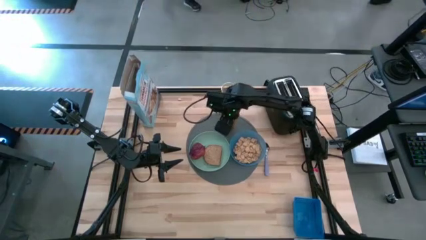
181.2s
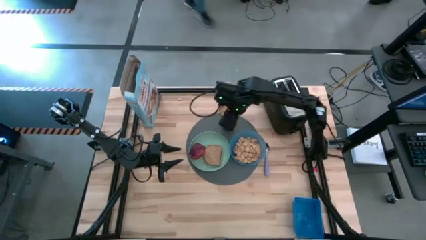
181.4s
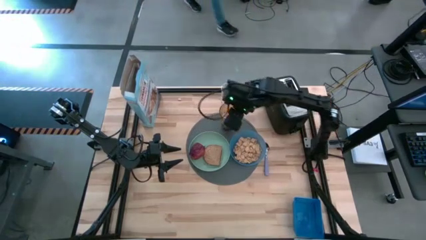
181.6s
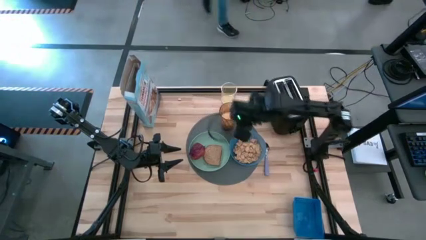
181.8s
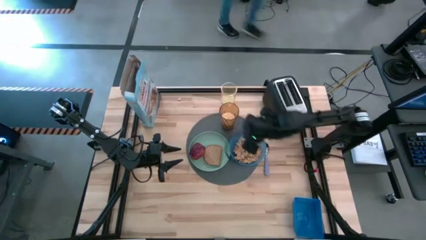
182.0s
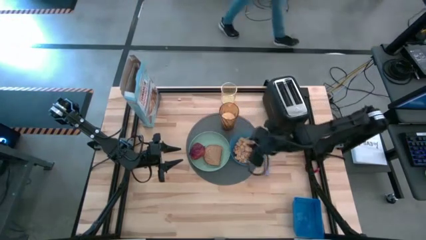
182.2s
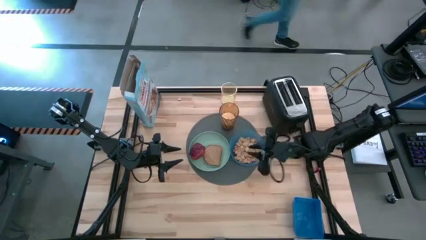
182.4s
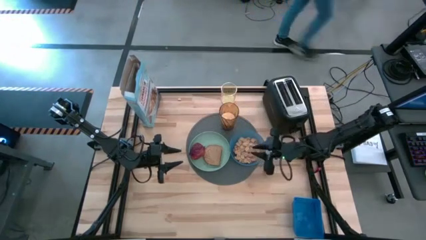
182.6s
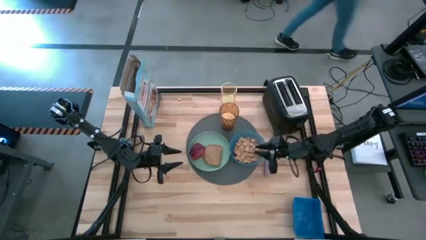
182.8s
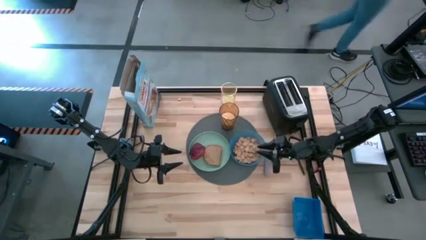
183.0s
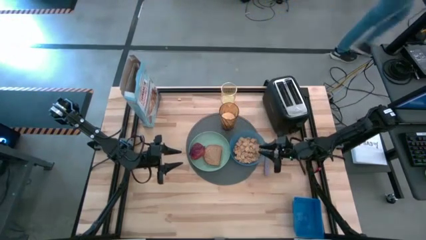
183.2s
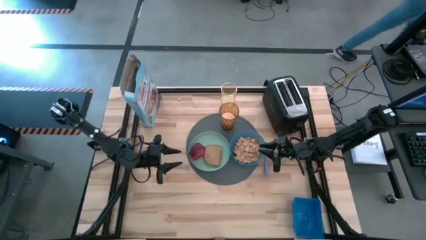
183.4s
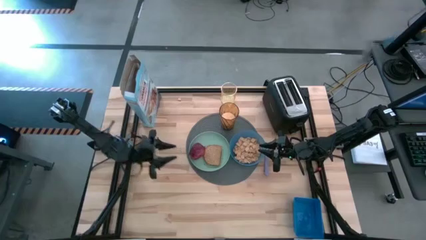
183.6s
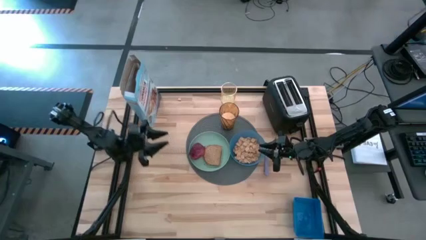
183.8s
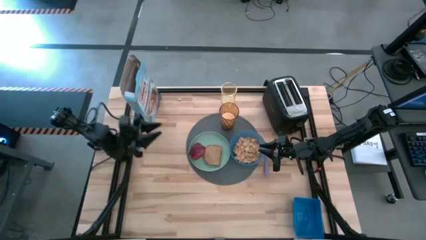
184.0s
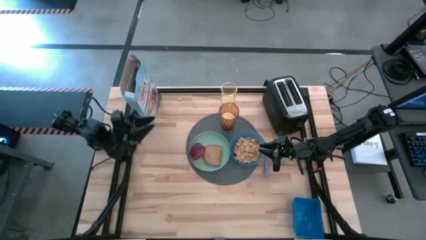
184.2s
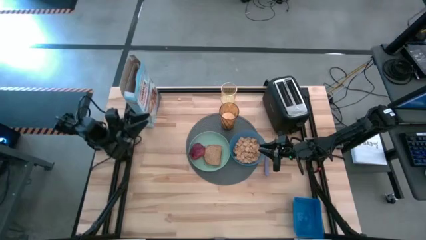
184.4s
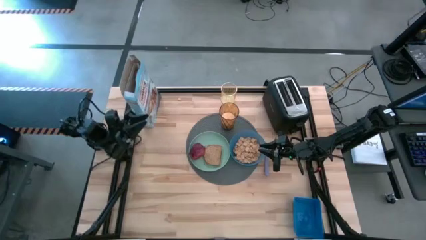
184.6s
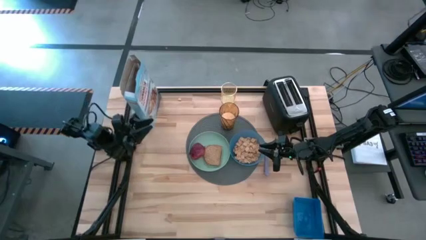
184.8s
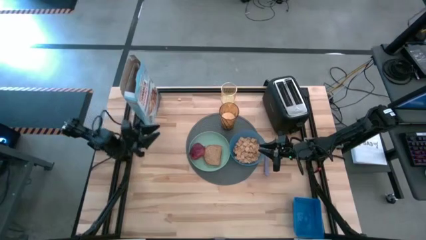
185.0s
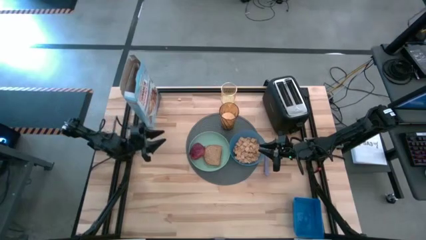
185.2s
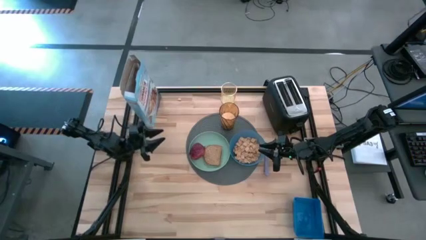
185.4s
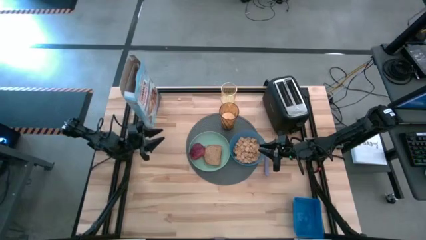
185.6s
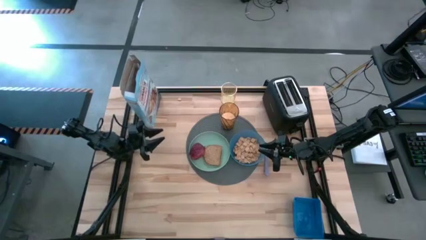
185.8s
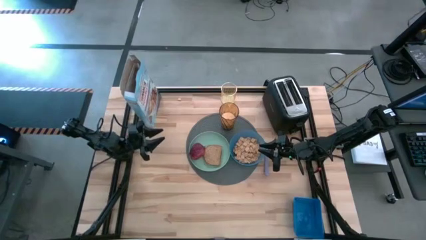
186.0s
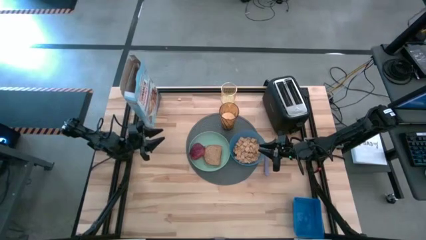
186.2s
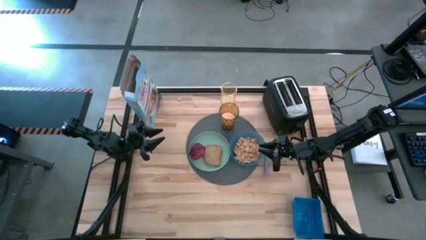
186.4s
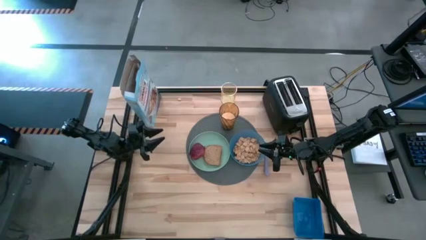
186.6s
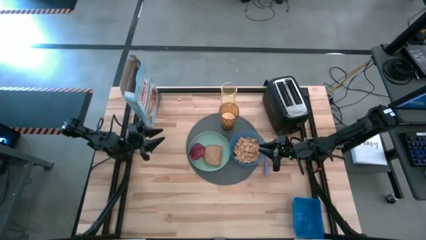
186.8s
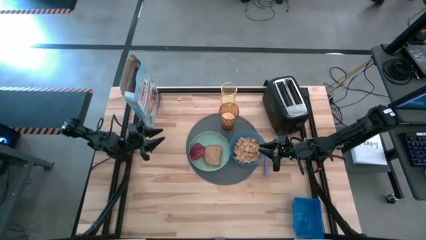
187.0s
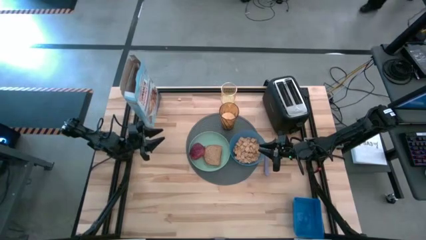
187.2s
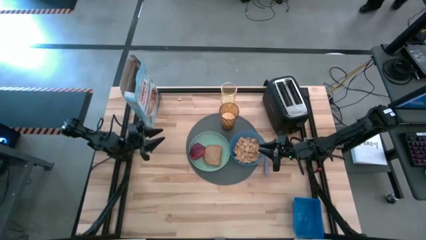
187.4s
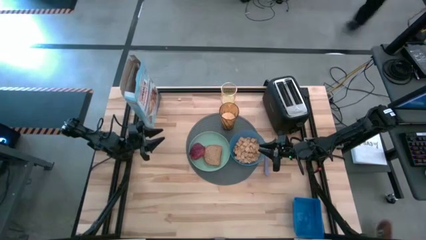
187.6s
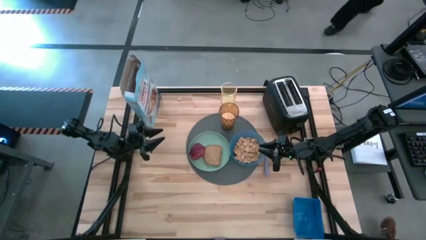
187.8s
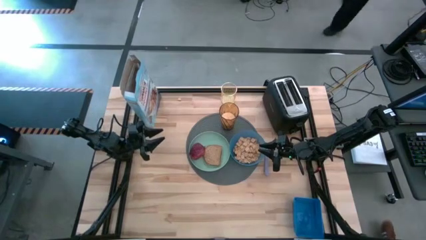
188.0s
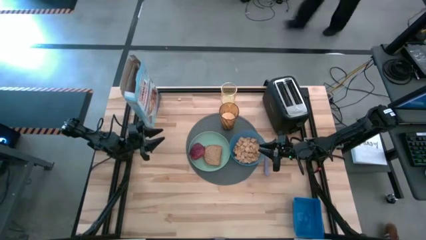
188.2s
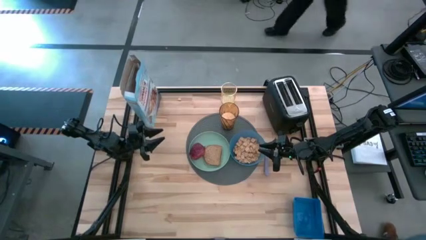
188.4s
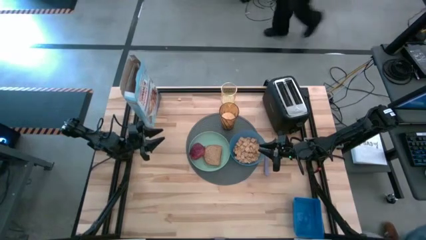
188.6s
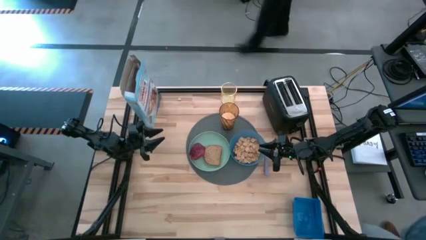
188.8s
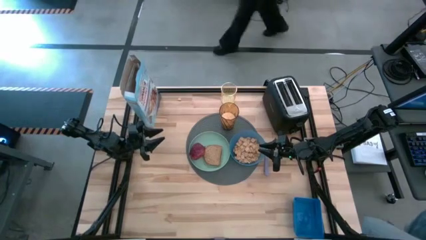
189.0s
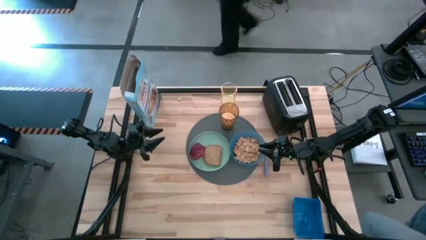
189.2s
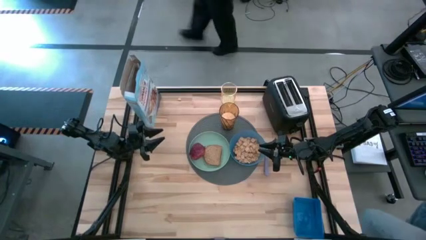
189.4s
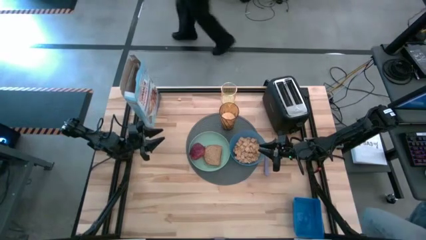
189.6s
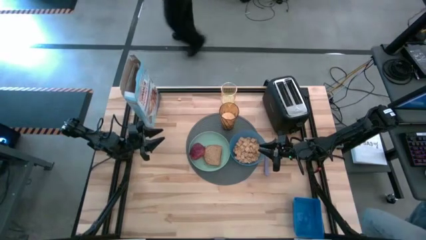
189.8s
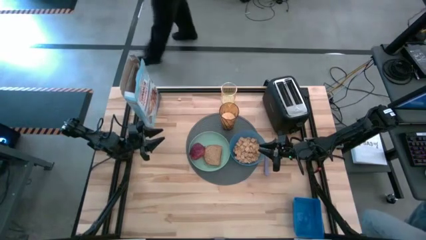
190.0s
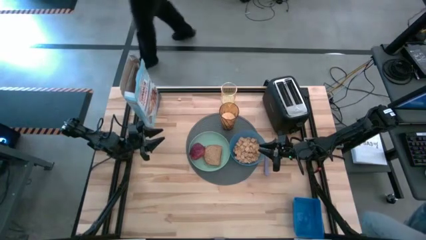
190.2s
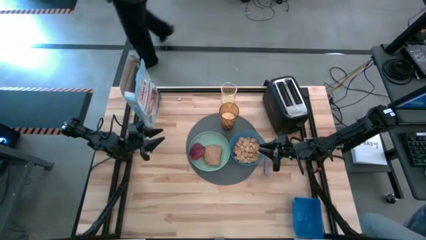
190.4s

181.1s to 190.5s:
Task: Arrange a breakfast setting
Return to Home Position

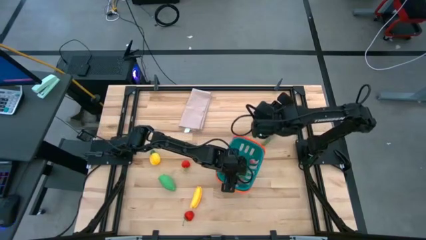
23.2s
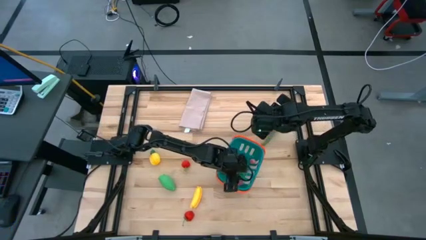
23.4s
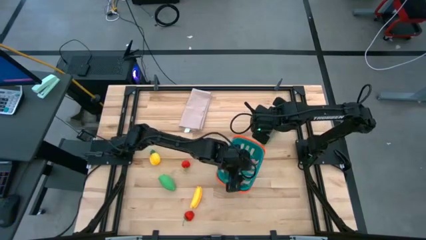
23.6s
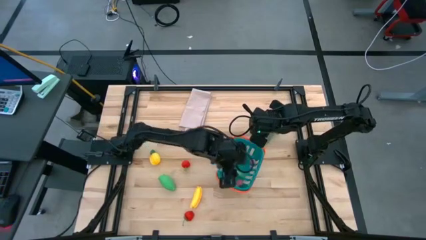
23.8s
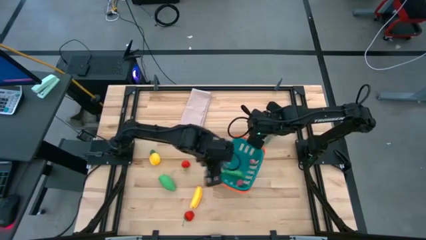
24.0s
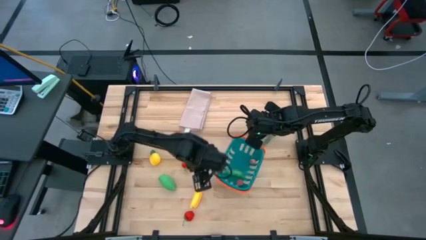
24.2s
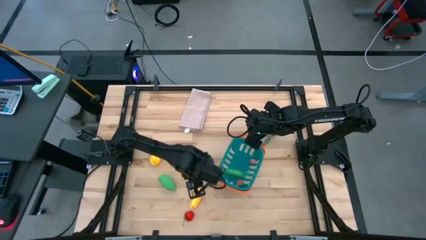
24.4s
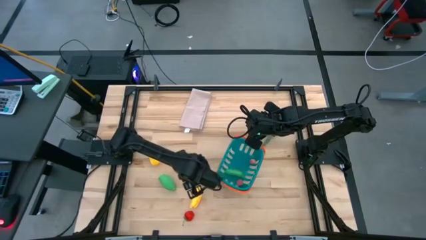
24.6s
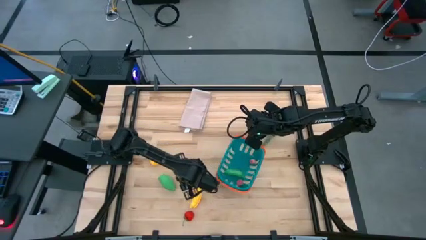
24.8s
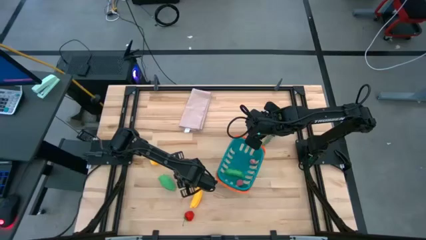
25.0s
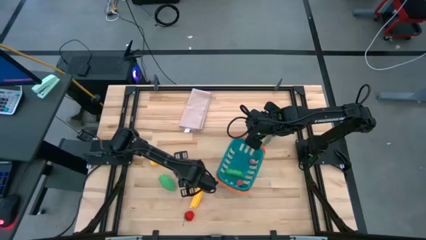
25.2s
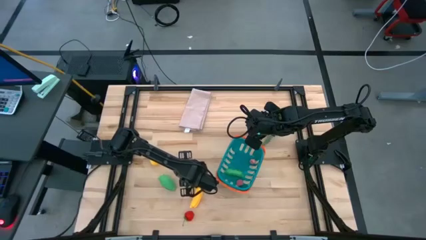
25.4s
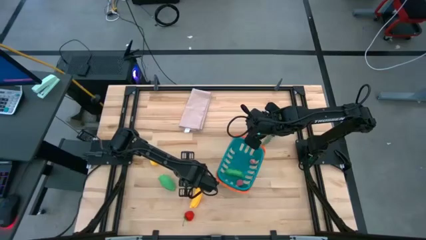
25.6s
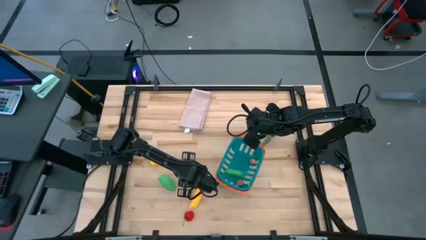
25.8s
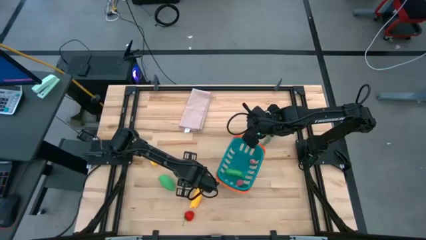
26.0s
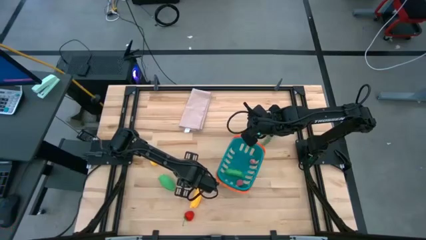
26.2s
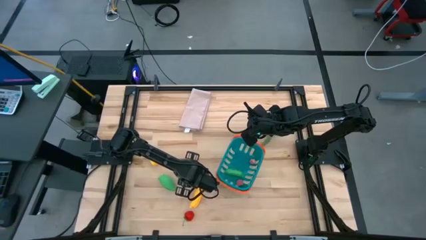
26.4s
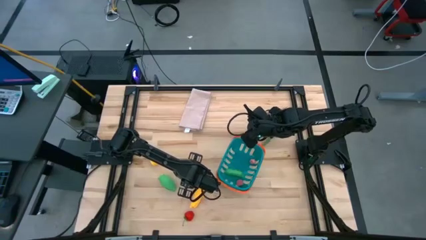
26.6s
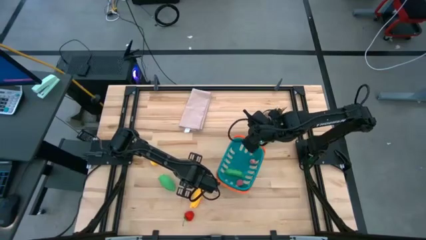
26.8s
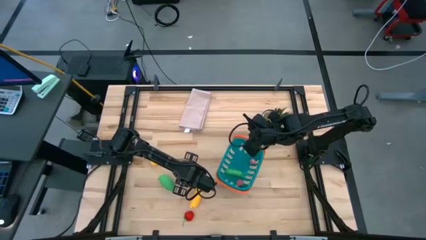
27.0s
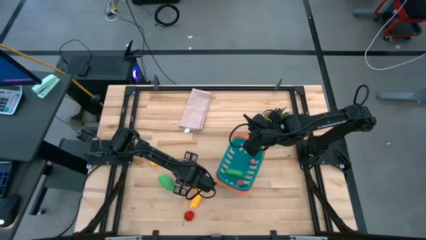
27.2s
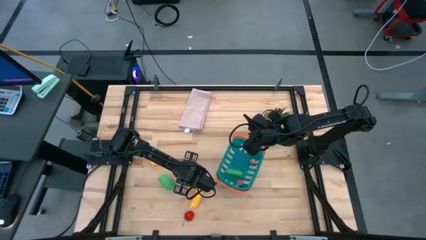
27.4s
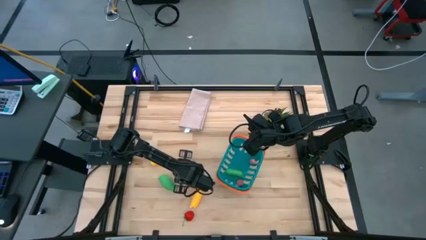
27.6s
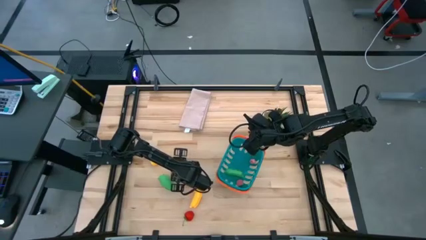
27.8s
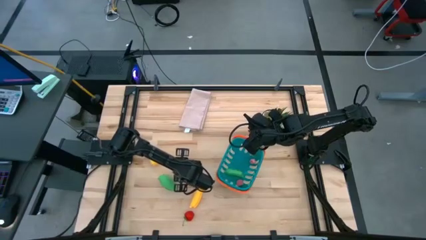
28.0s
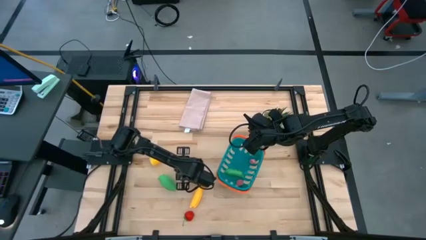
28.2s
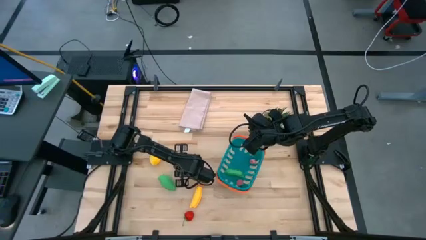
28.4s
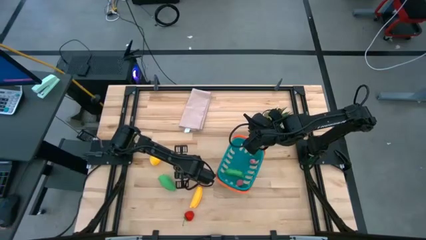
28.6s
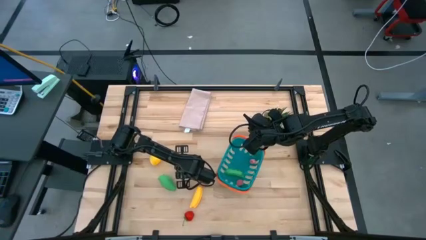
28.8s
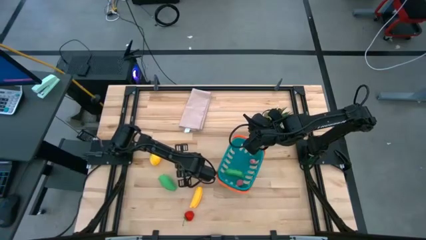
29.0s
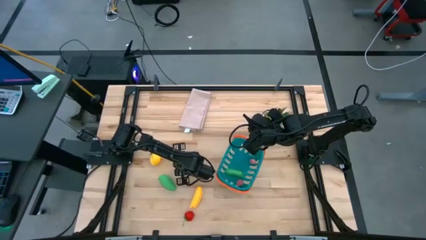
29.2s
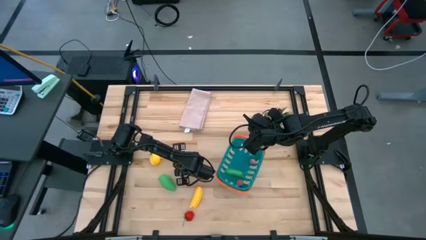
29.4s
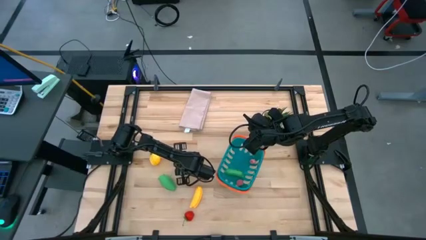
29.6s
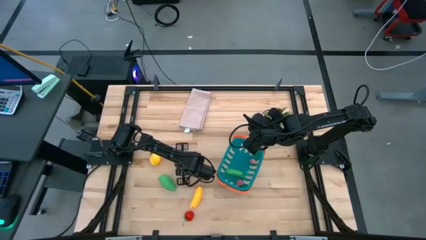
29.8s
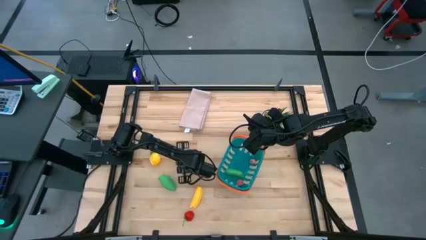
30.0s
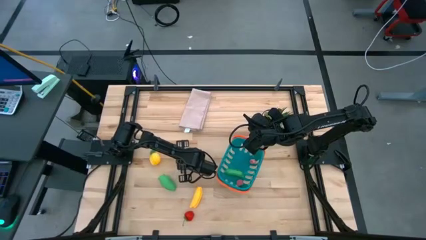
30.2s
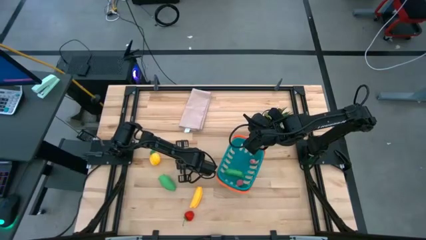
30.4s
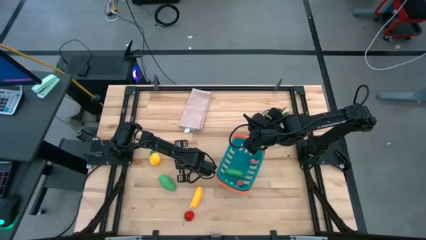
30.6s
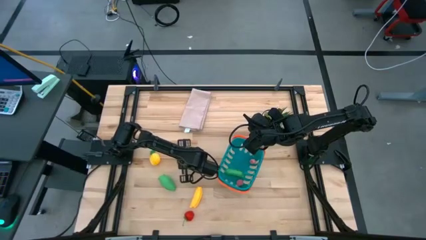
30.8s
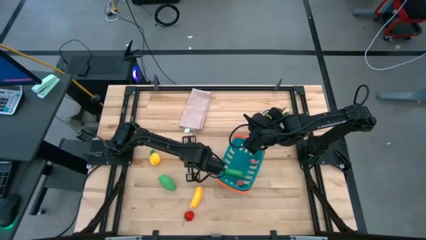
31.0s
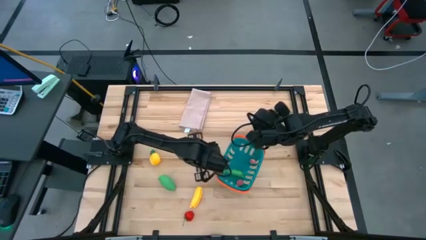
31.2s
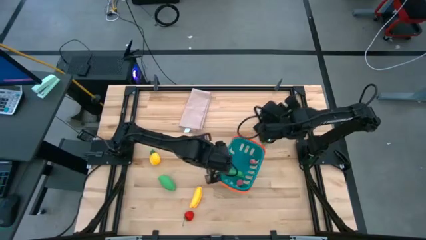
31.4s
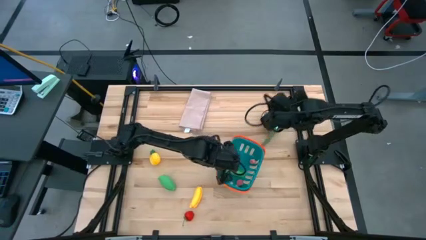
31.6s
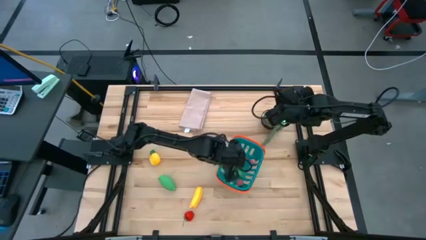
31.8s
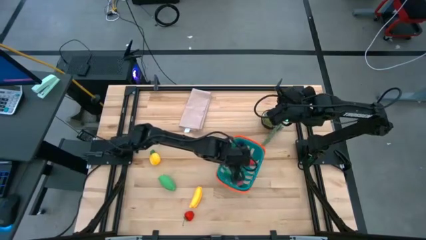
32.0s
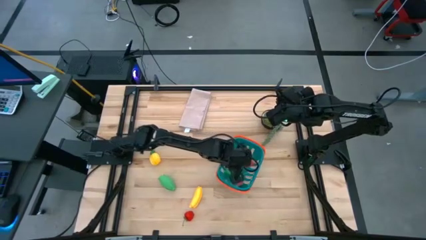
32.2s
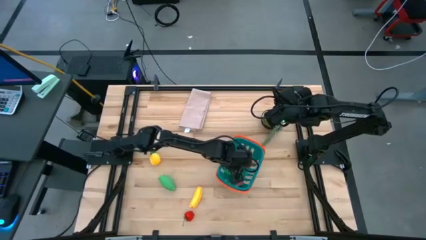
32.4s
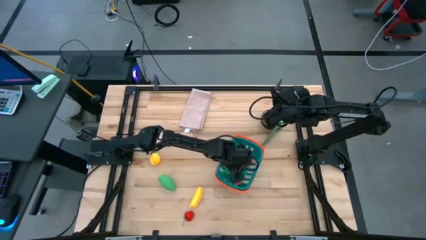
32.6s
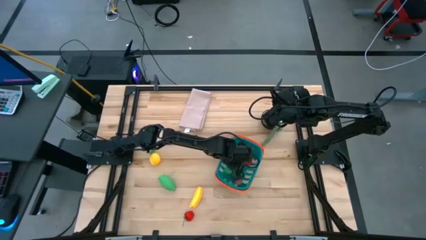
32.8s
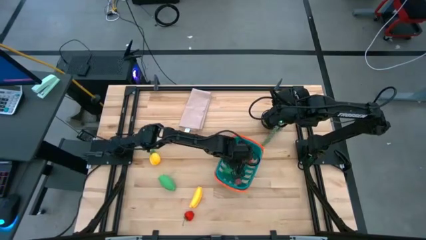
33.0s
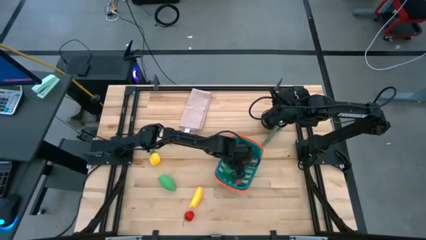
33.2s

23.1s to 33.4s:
Task: Pick and placing Produce into tupperware
Put the top red strawberry into the blue basket
